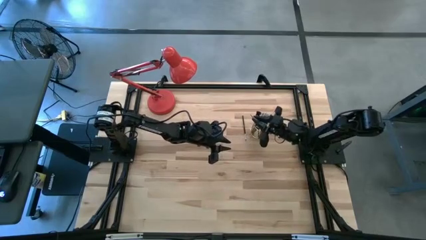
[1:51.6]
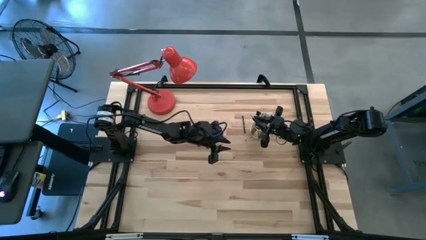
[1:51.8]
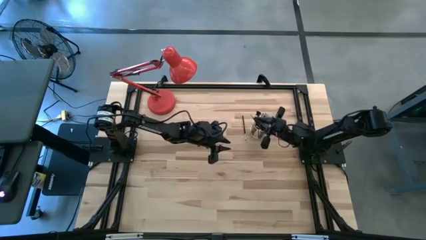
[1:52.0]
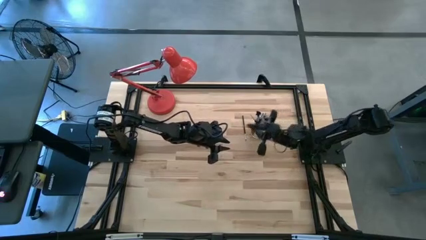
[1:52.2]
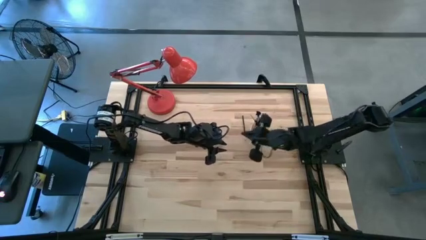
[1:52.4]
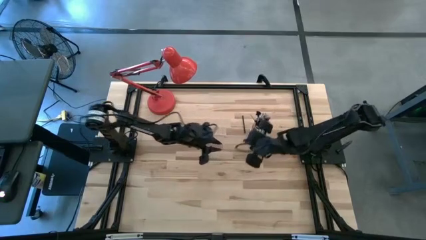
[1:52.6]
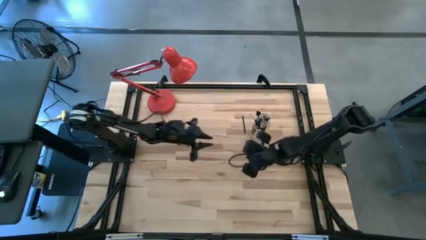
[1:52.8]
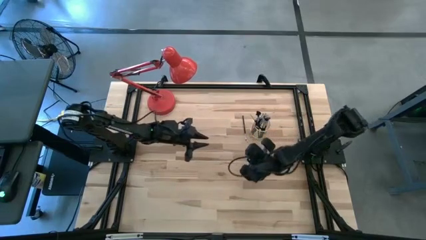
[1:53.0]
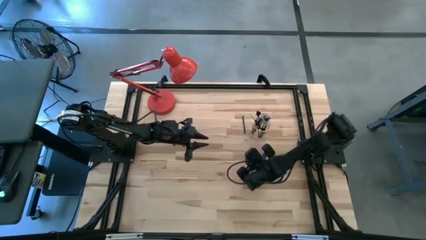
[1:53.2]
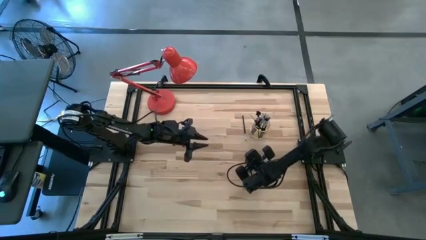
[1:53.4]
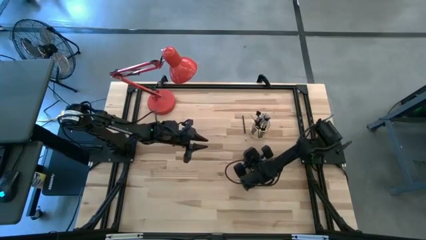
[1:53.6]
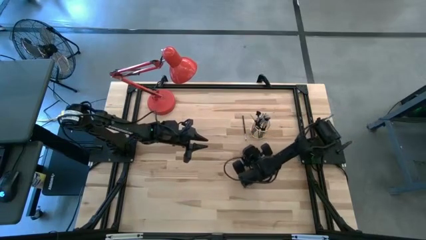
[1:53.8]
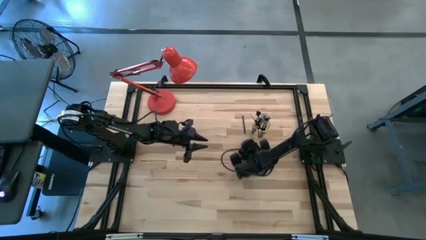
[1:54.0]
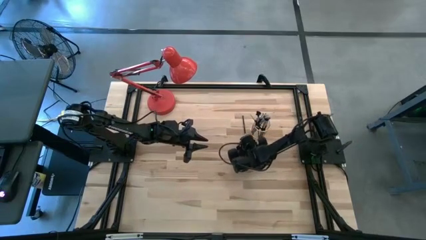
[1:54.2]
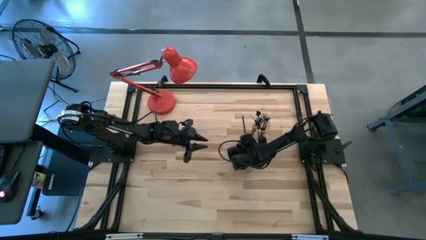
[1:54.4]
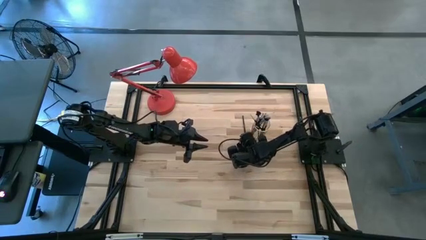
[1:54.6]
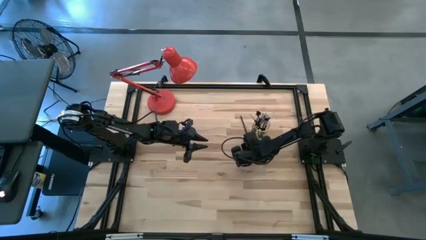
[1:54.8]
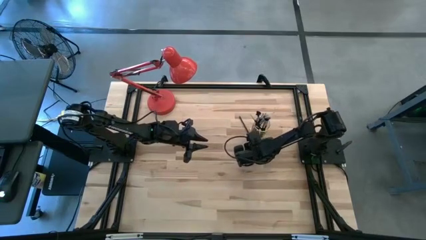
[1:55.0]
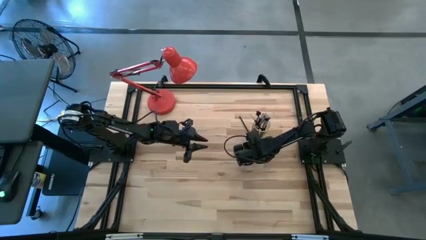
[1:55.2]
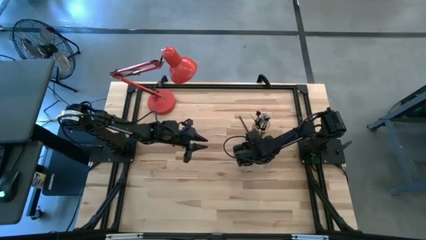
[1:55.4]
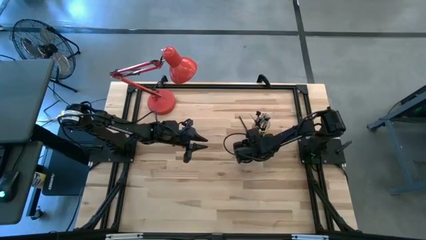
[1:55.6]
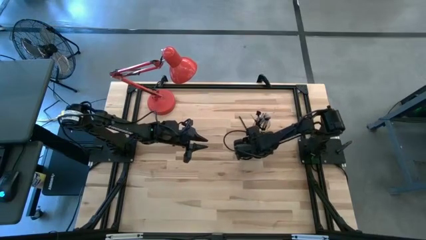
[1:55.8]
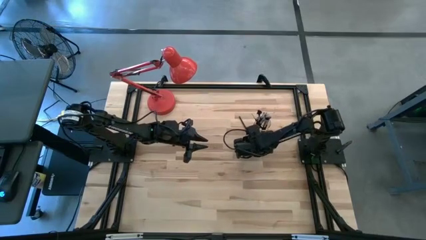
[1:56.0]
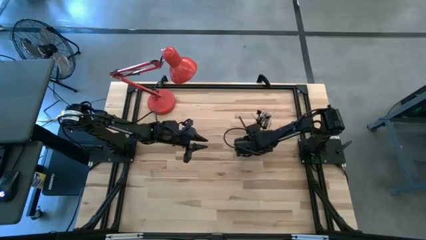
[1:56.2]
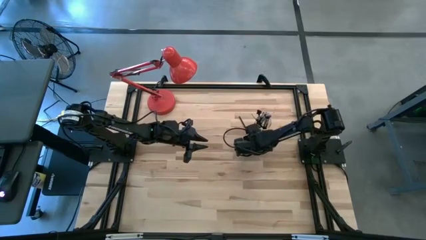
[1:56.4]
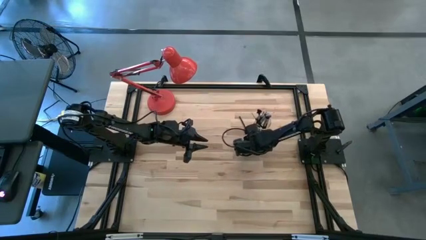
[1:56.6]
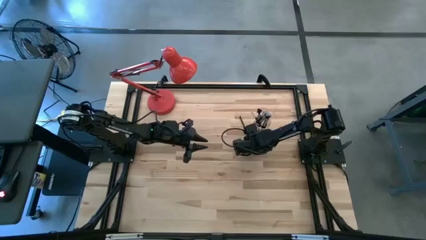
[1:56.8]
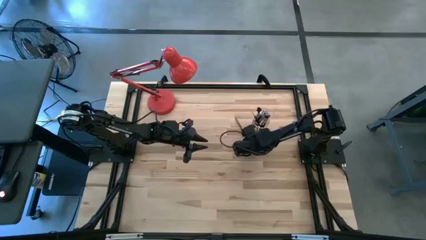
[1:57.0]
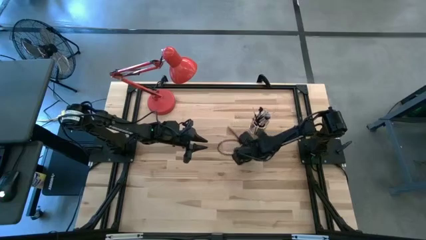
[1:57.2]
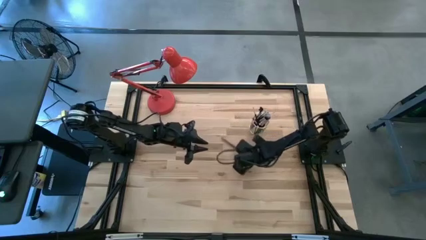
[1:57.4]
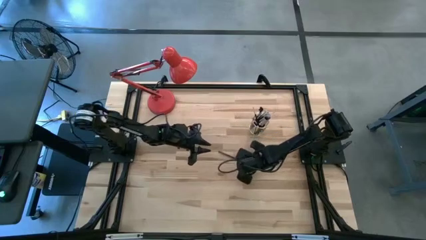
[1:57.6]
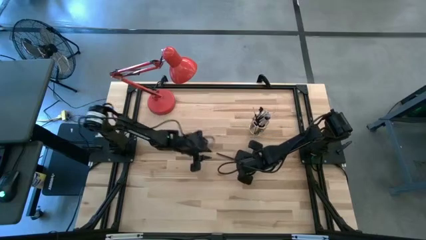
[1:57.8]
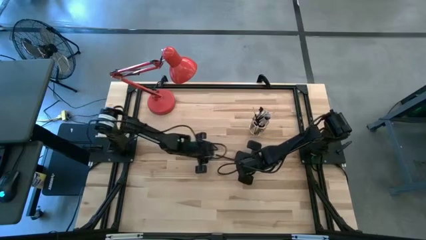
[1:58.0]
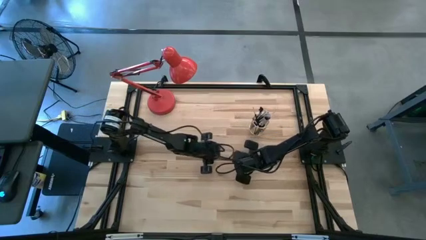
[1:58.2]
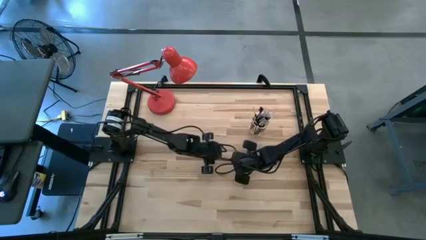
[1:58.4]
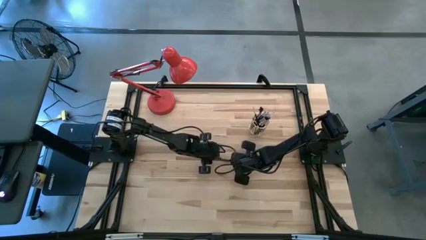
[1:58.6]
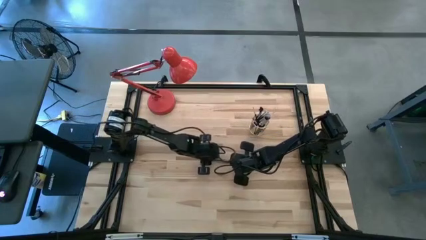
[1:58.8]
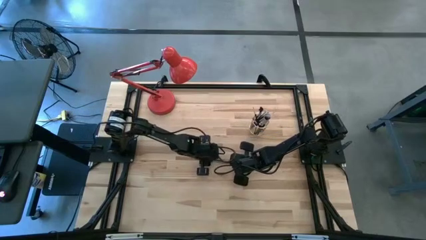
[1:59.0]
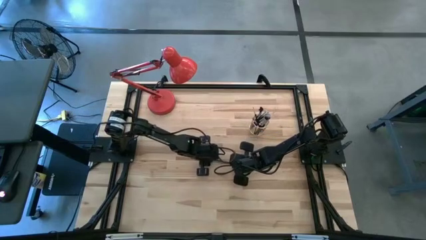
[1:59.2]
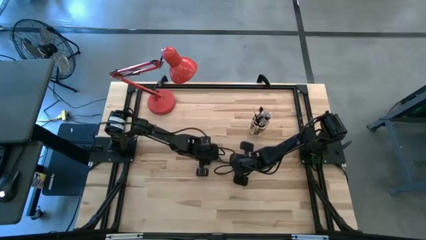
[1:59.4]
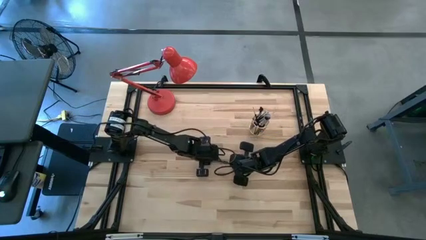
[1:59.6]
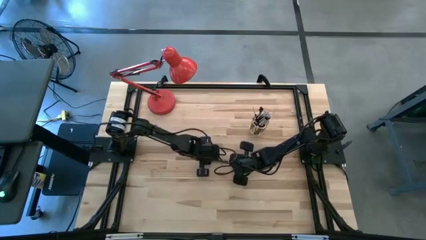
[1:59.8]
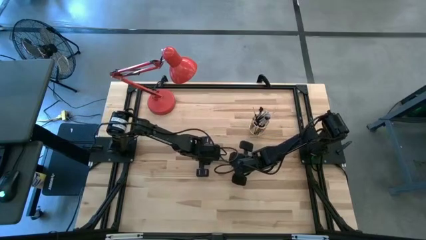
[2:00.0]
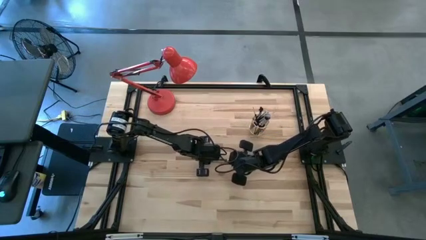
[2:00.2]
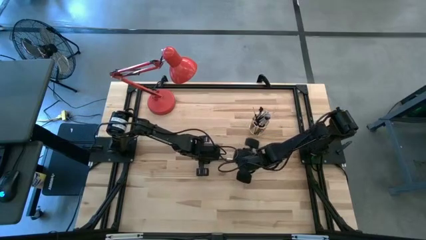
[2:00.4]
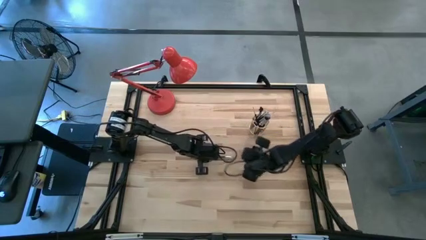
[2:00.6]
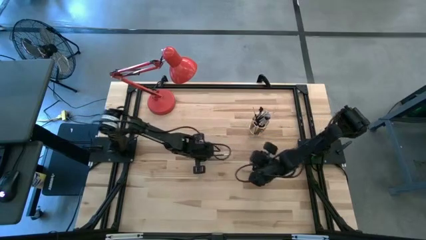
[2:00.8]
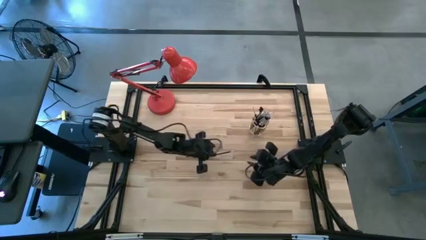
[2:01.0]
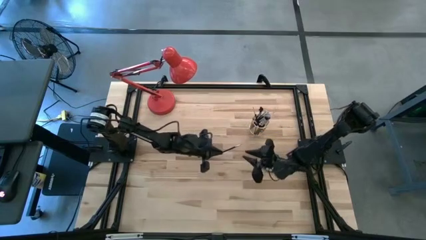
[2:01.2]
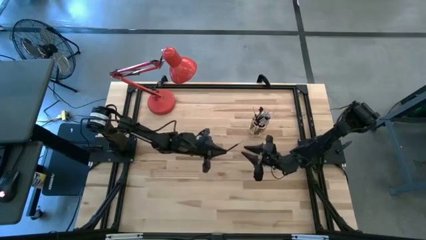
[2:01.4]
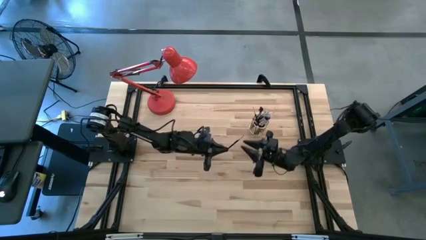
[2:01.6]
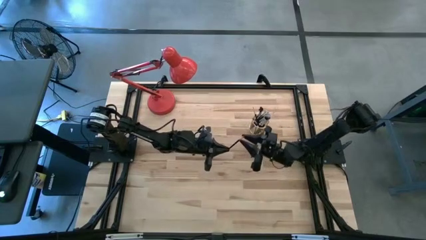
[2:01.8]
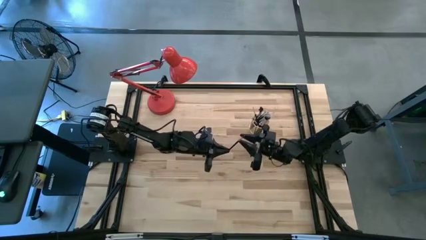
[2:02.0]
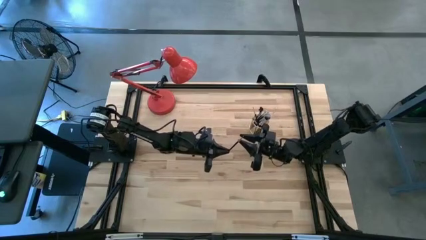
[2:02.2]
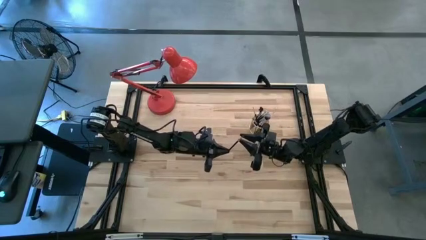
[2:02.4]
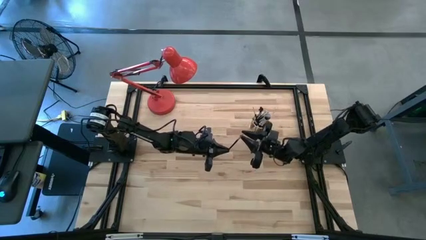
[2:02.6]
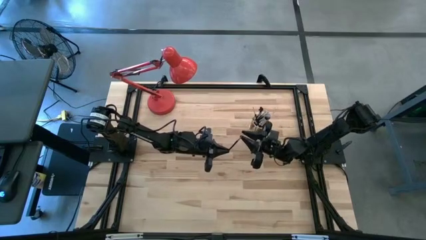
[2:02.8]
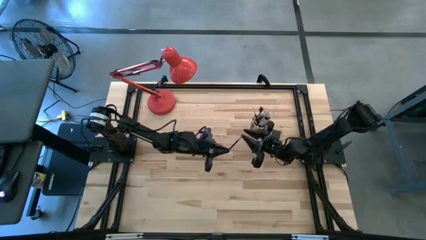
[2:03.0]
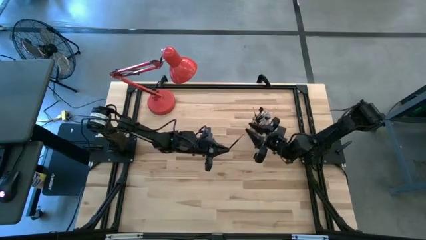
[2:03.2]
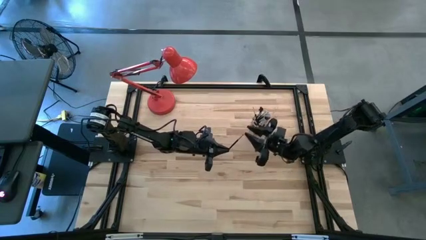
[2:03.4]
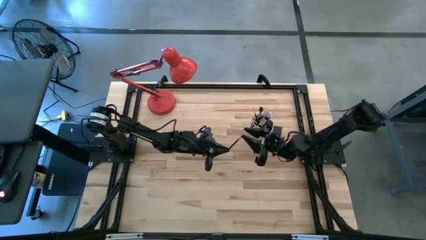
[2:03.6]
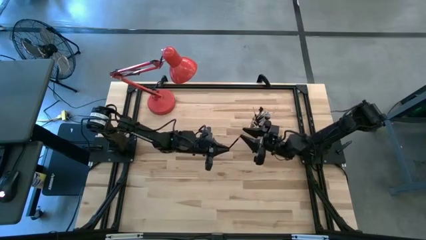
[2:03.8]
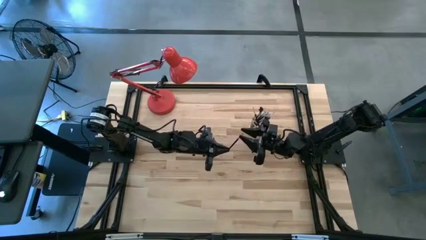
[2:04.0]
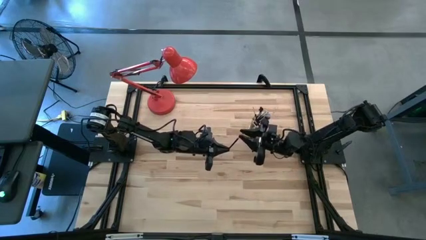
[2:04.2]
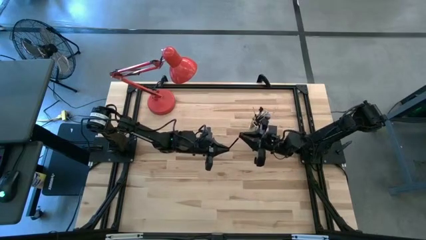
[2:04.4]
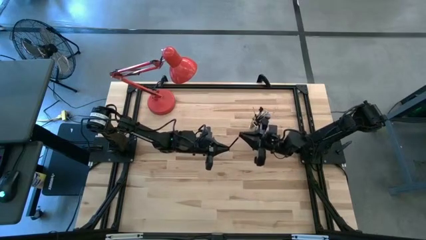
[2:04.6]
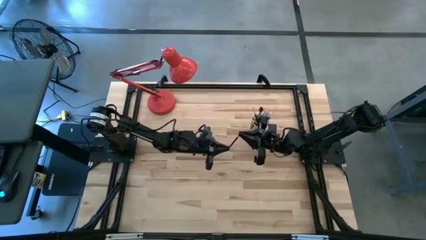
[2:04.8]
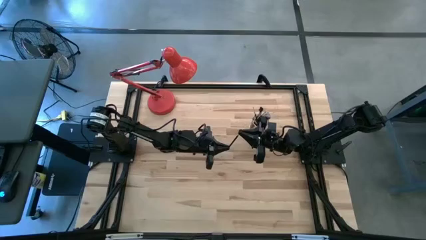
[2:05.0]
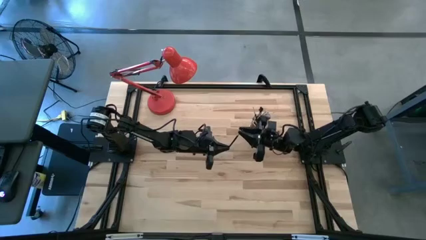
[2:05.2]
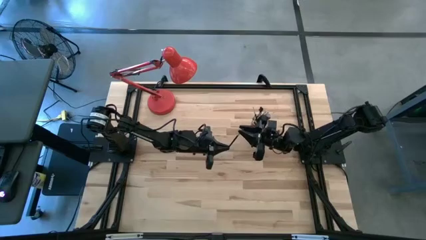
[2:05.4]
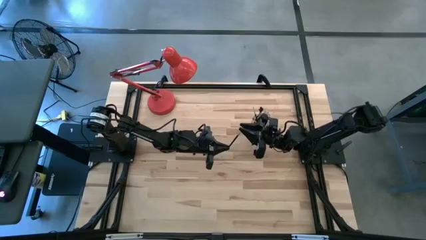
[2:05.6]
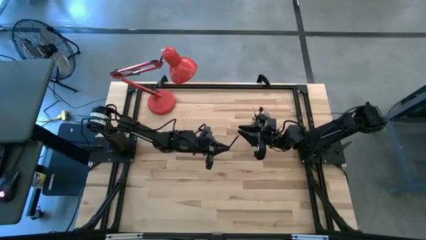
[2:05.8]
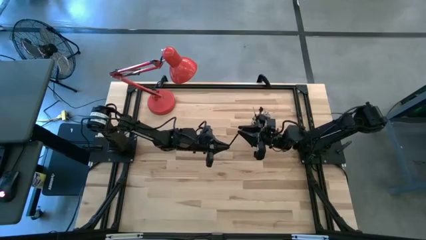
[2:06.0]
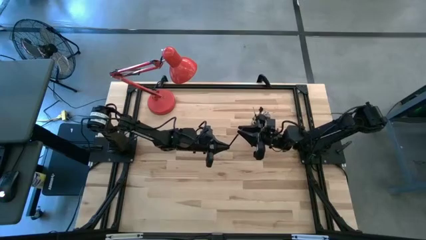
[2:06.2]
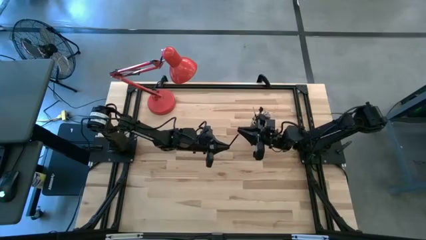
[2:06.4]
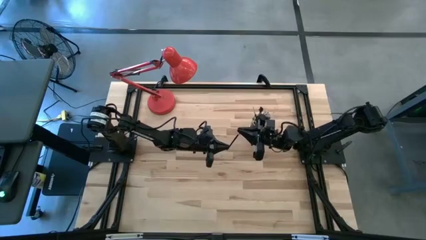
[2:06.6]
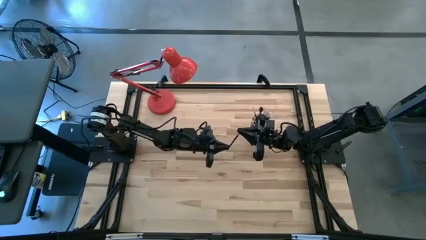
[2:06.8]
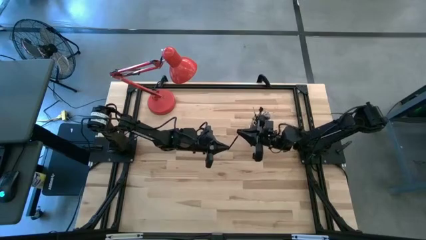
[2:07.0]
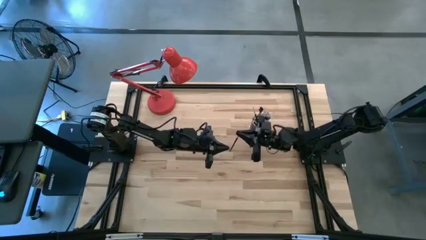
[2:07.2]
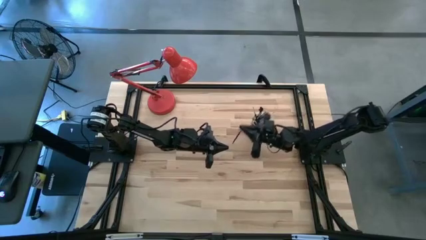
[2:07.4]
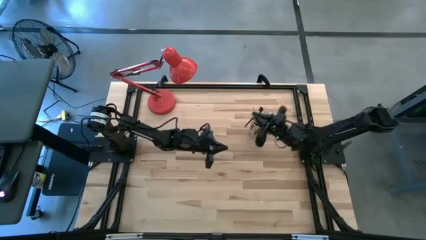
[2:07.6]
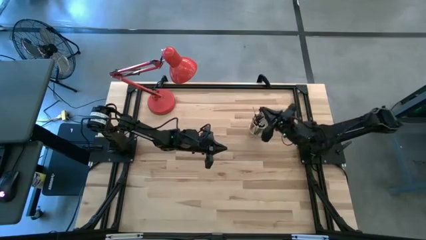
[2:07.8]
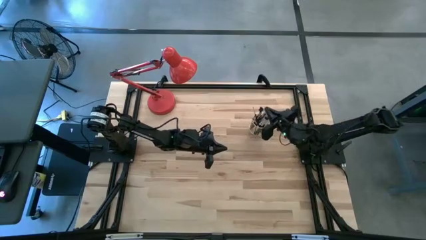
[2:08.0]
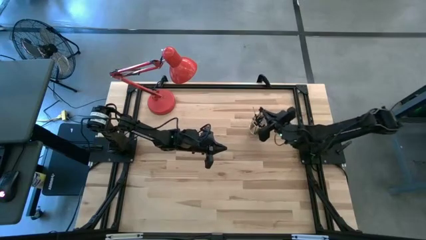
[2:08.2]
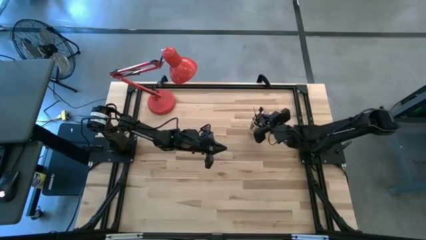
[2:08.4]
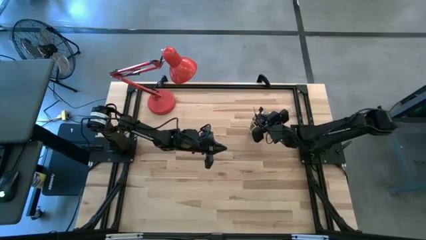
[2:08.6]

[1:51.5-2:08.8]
Task: Put items in baskets/containers
Put the black brush into the gold holder
